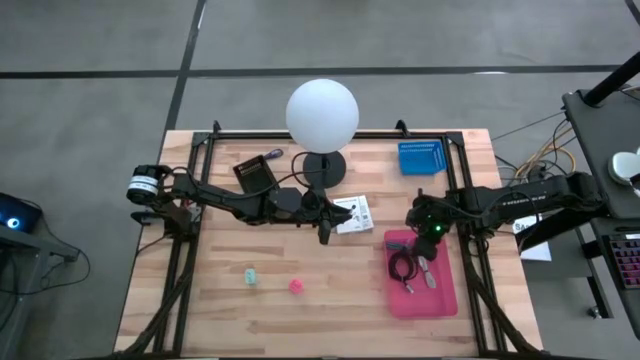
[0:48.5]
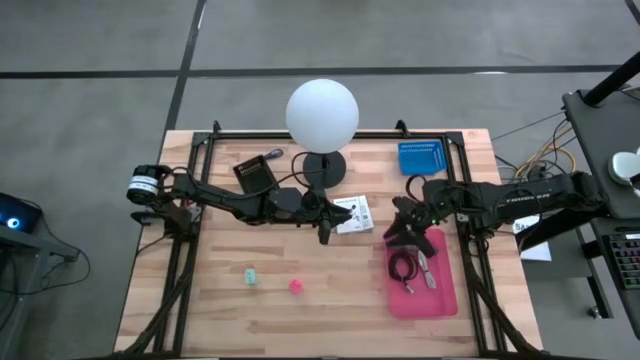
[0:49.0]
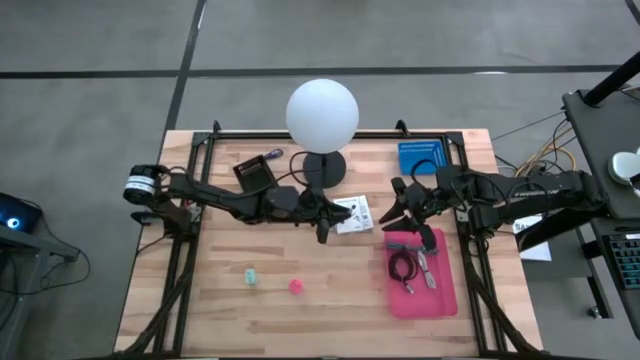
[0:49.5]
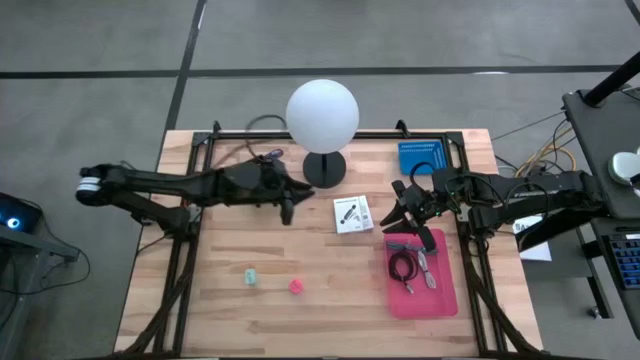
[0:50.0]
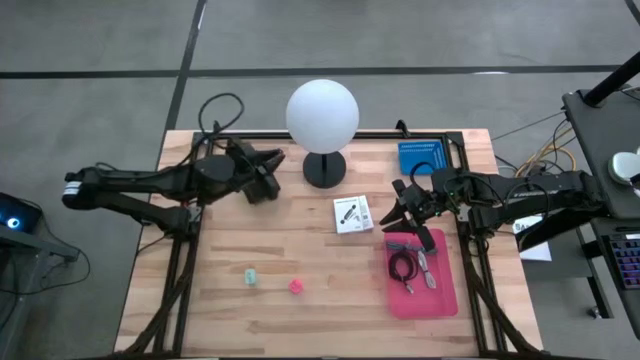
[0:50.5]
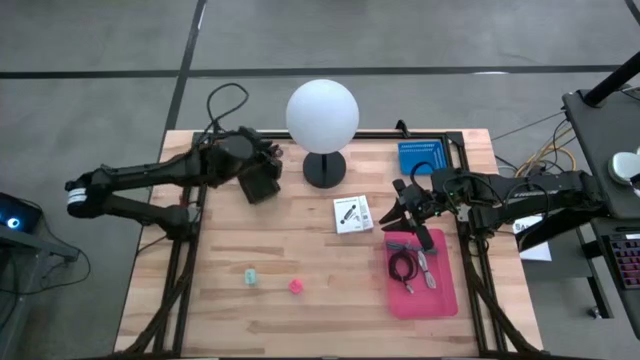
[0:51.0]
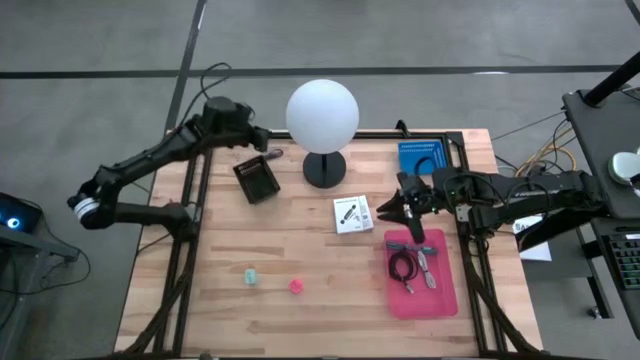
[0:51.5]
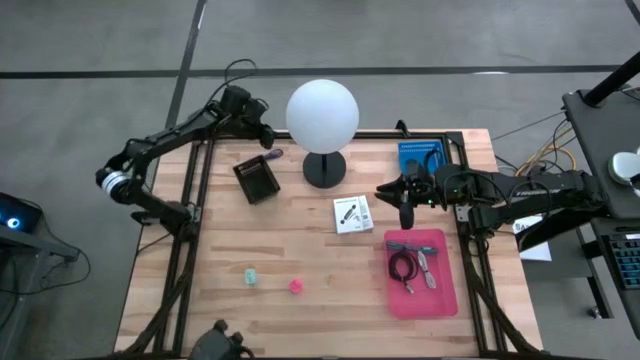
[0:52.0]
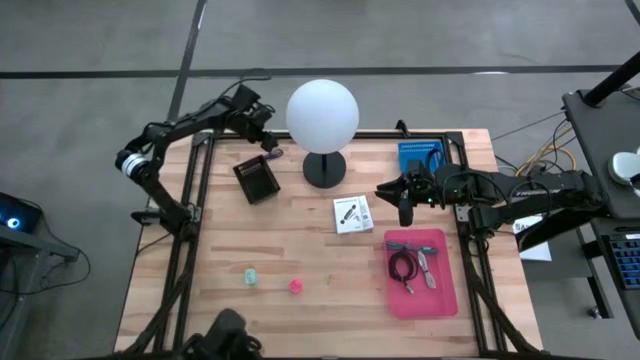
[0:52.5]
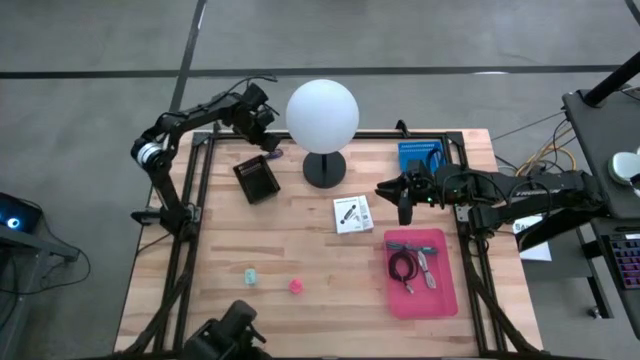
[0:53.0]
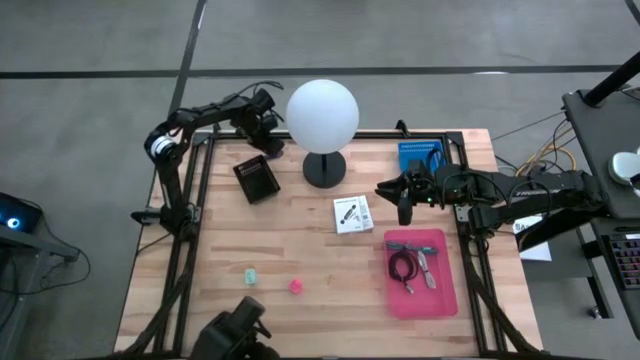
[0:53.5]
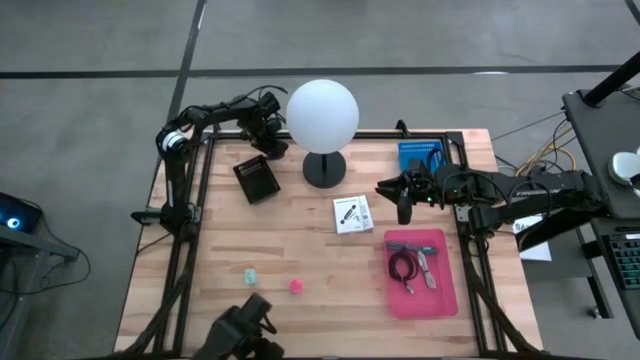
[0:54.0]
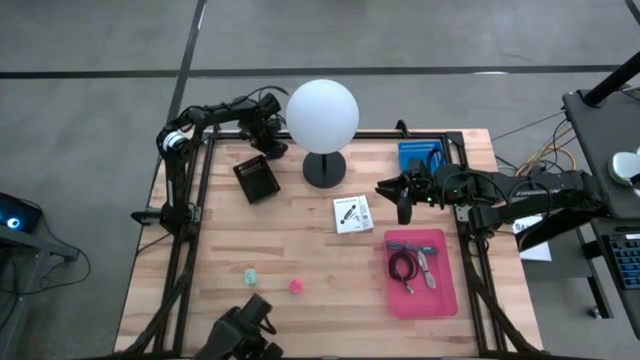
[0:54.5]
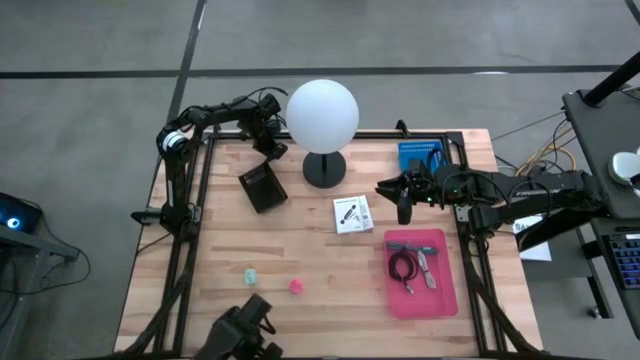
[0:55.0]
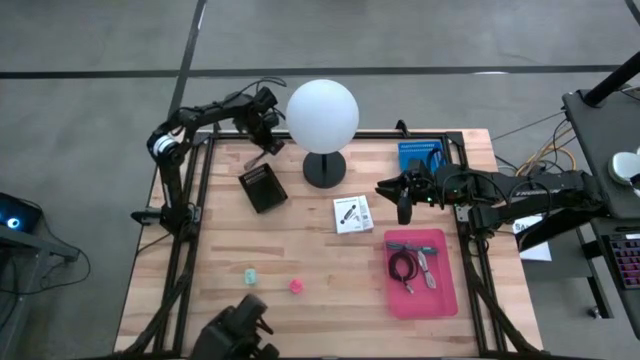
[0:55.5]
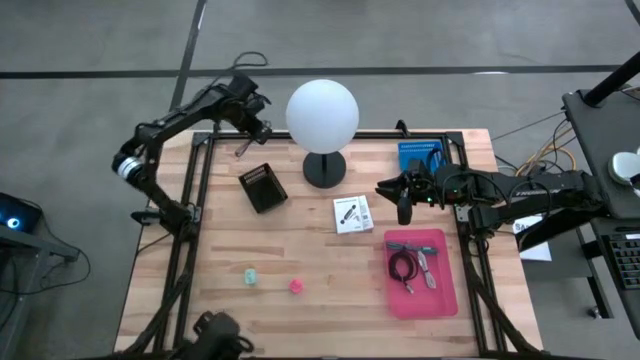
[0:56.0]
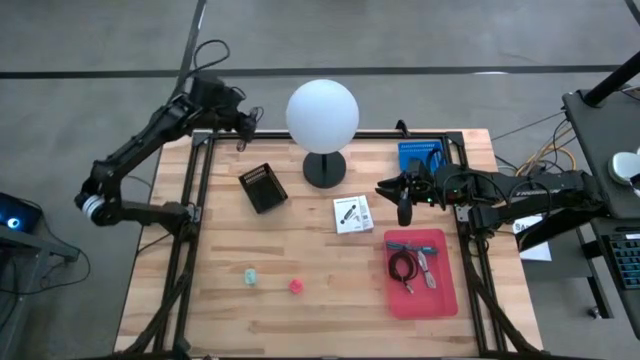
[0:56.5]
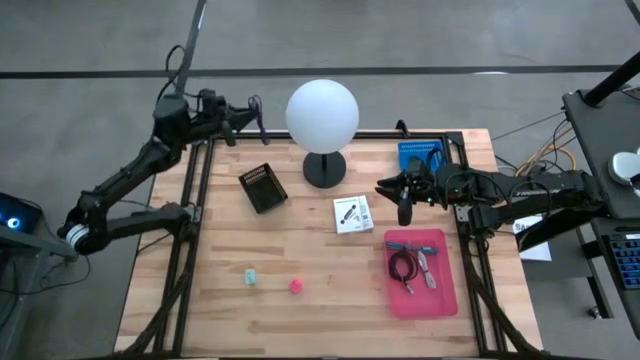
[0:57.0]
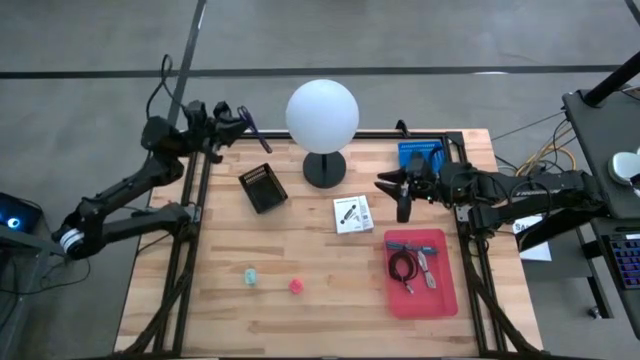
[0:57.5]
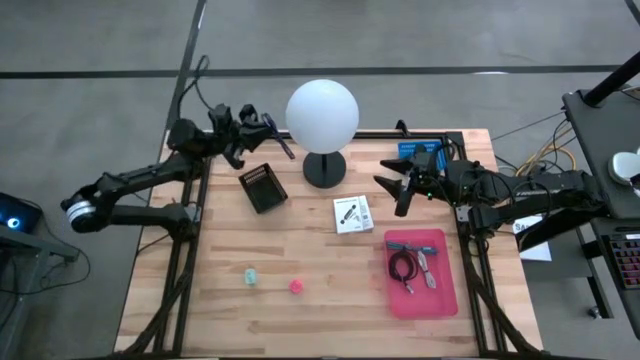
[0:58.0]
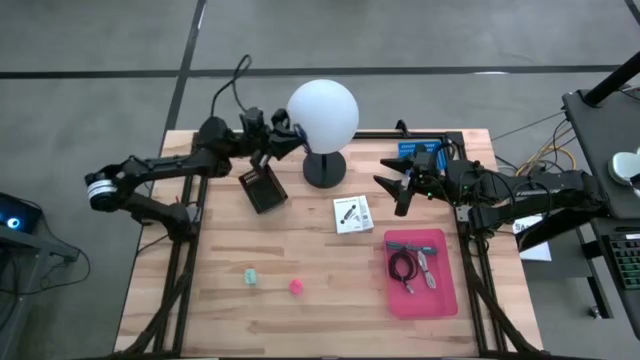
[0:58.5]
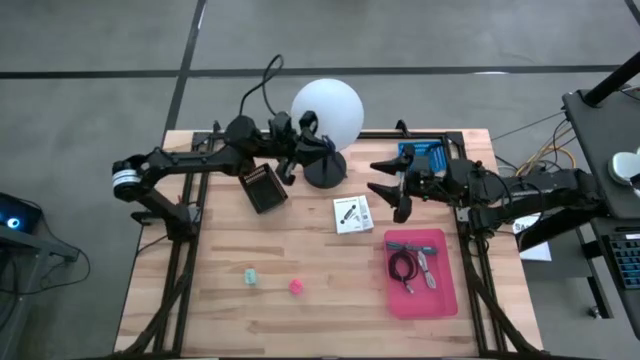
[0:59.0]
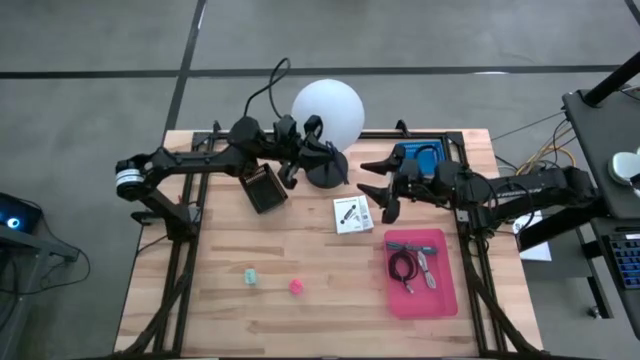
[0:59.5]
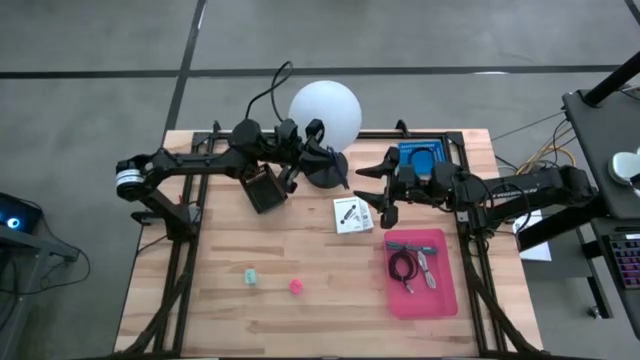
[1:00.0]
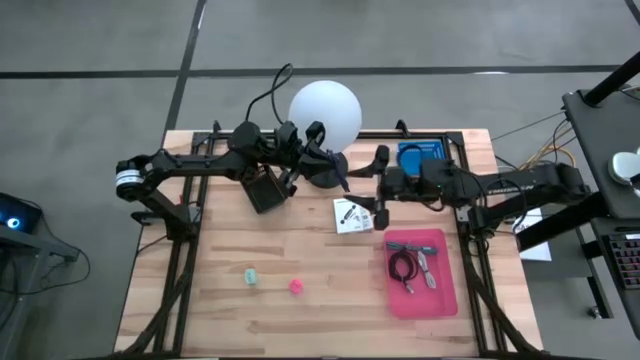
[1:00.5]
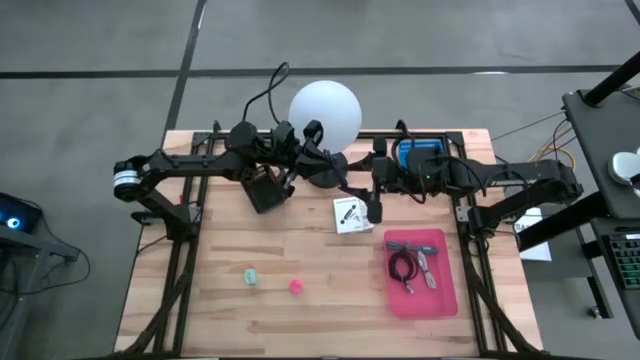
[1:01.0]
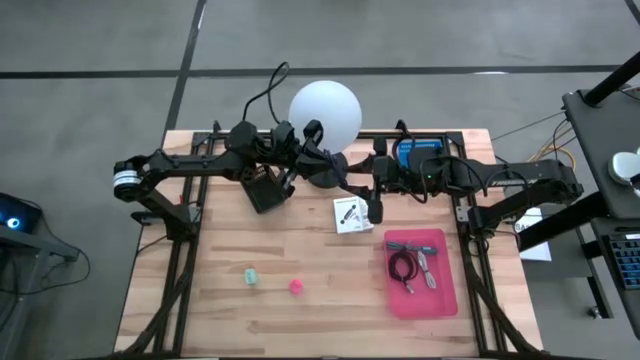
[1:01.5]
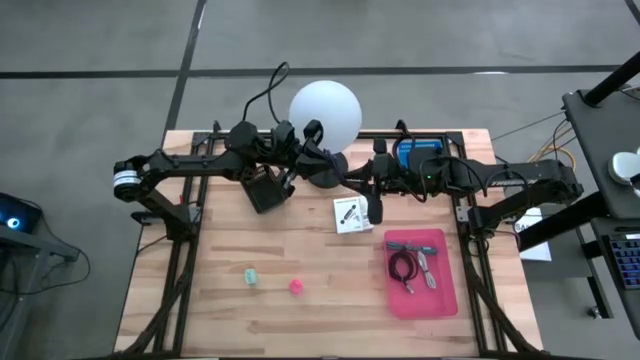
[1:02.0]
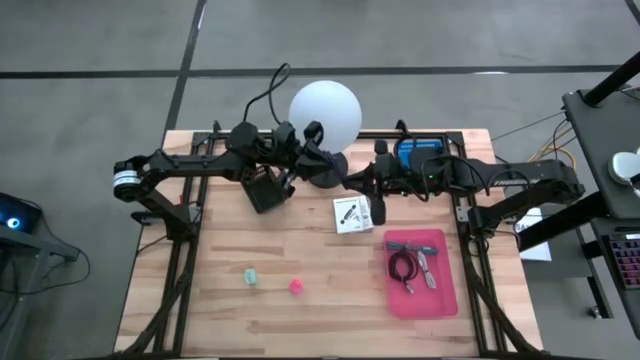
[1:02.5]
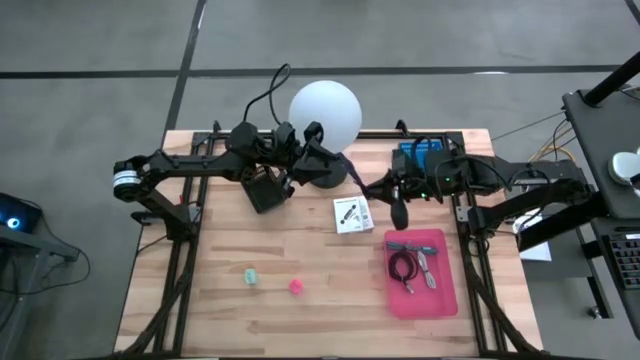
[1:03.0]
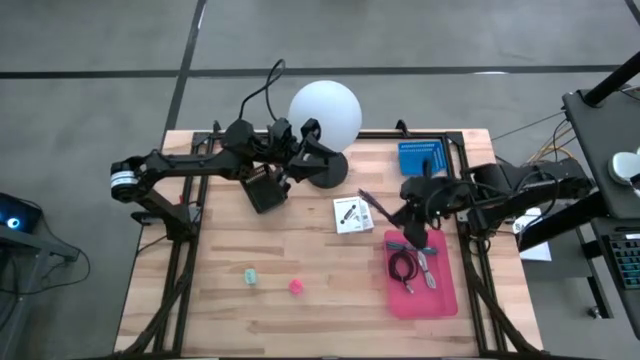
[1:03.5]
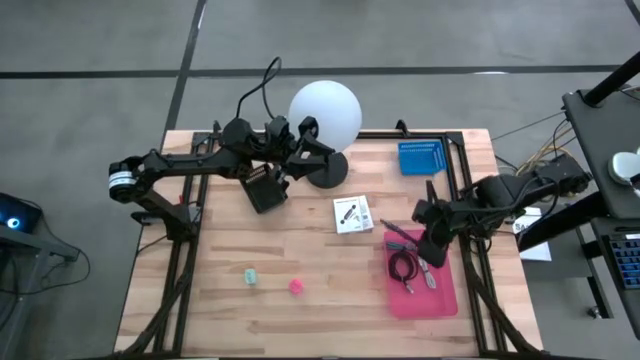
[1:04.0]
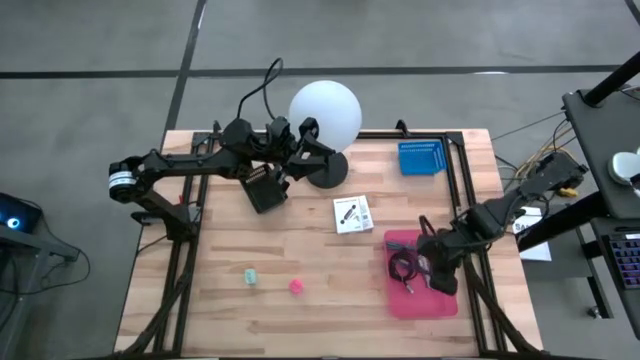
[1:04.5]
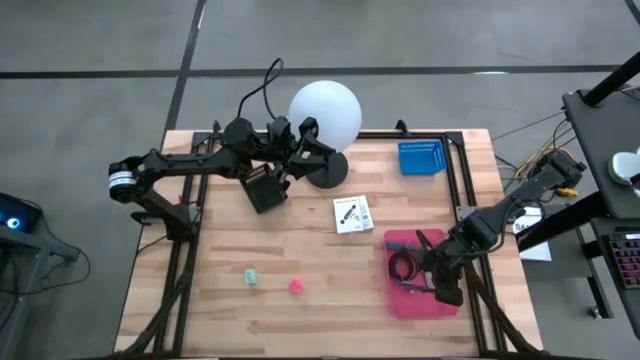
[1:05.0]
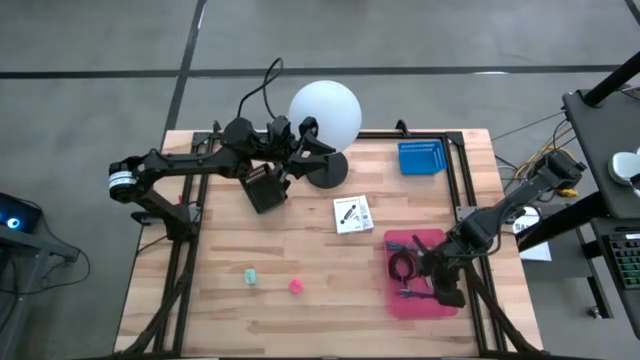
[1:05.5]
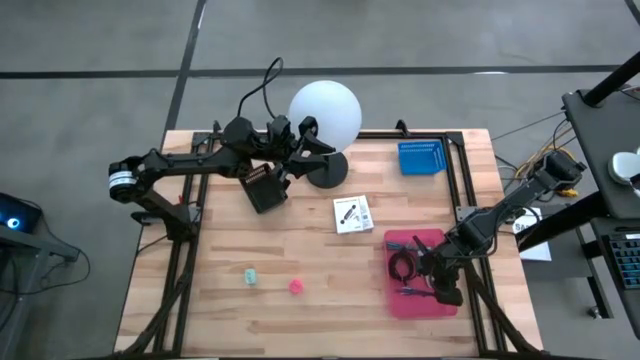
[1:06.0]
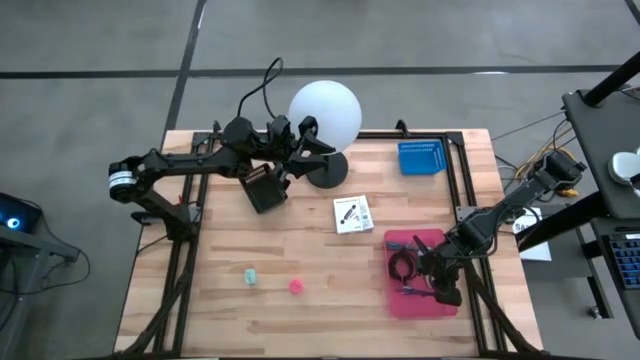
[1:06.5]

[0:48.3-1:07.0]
Task: Pick and place items into bin
Put the purple charger cable into the pink bin

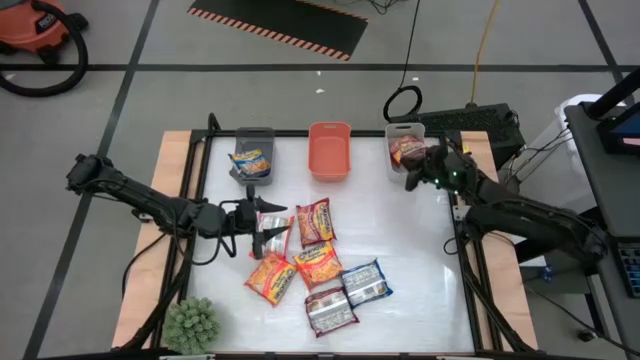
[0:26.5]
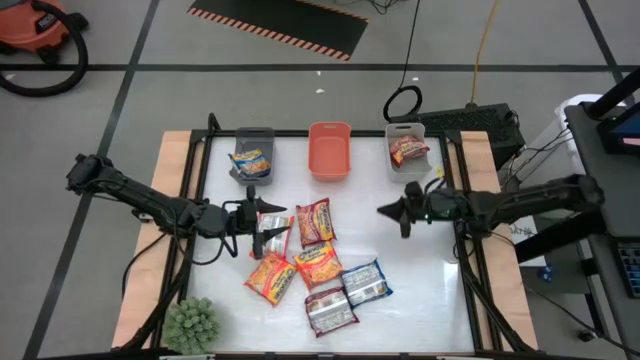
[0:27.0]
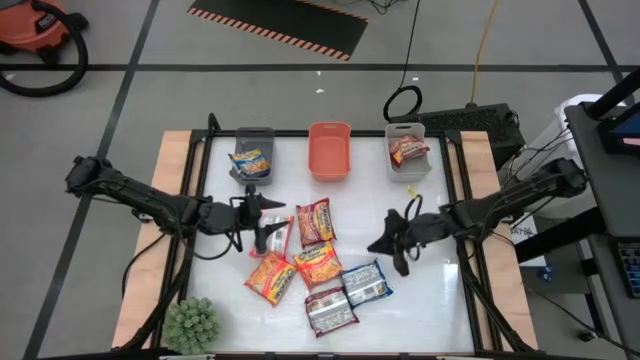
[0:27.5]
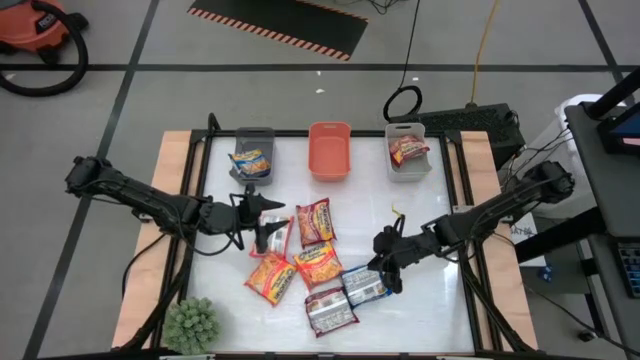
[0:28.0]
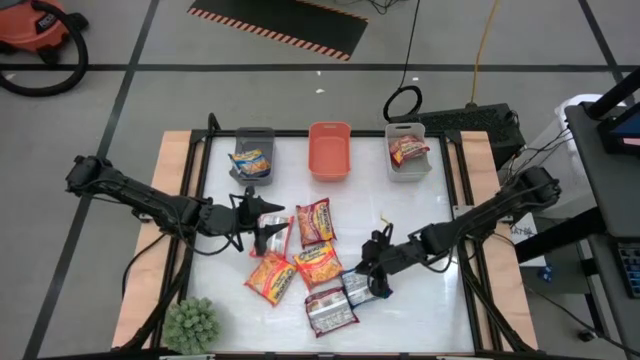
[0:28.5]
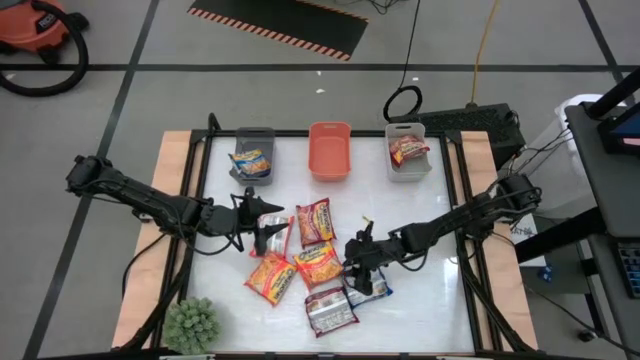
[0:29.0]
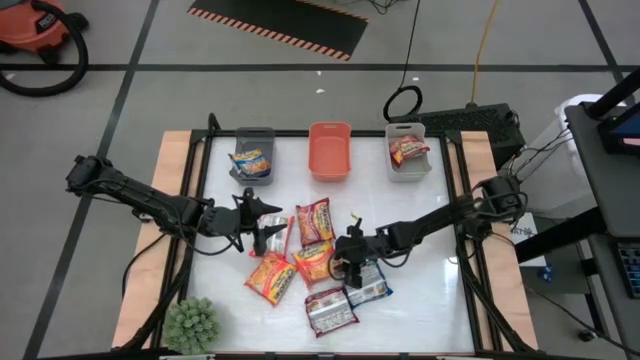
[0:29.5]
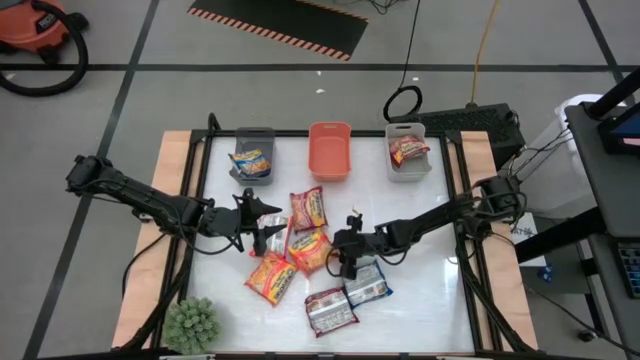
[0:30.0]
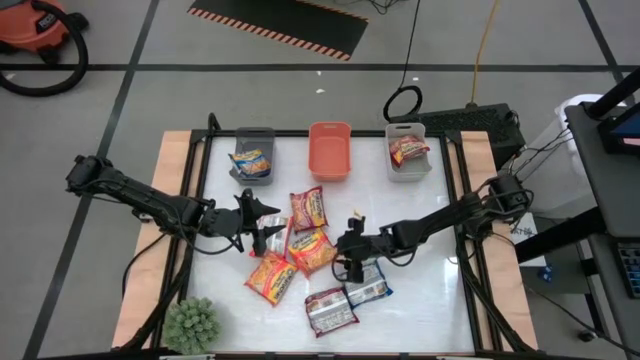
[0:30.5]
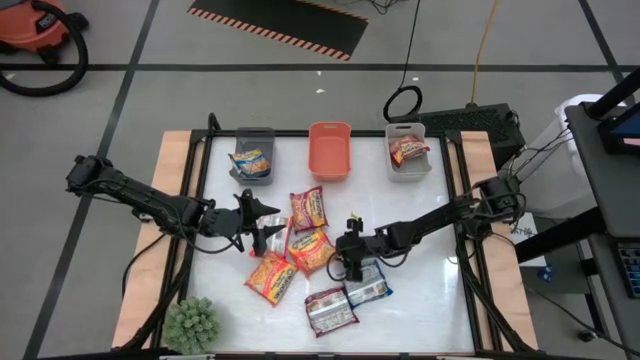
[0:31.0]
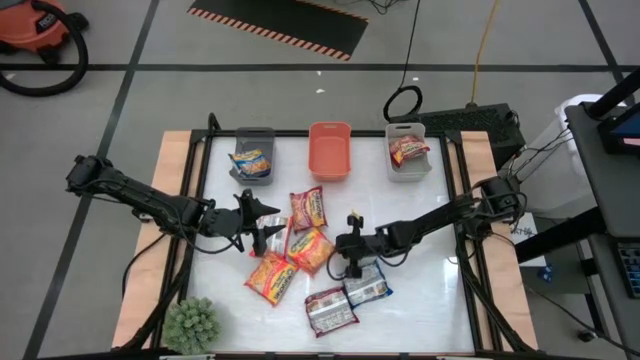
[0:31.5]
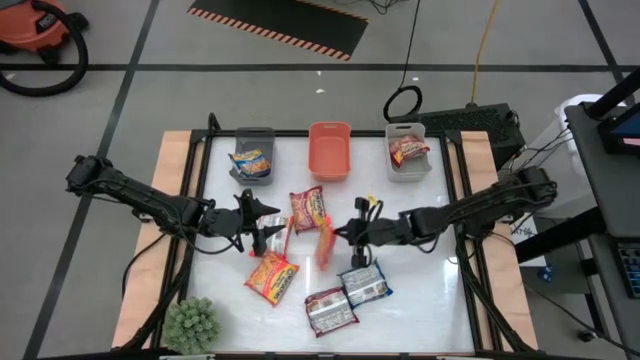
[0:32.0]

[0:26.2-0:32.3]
Task: Sort Maruchan noodles
Put the right orange noodle pack into the orange bin
